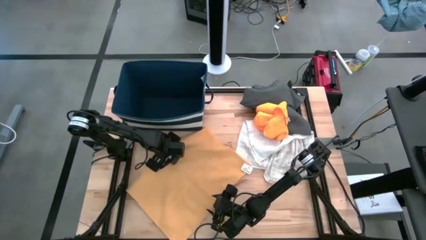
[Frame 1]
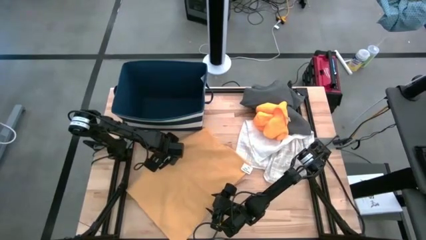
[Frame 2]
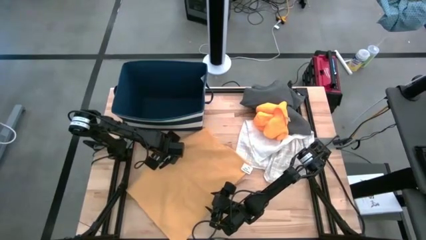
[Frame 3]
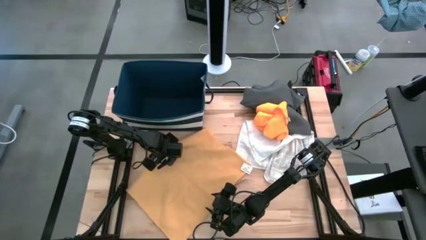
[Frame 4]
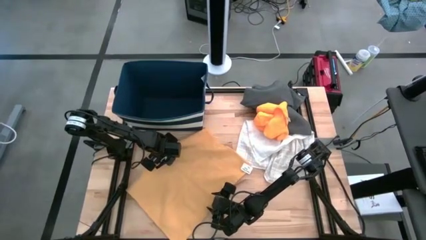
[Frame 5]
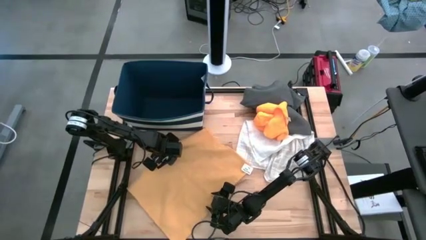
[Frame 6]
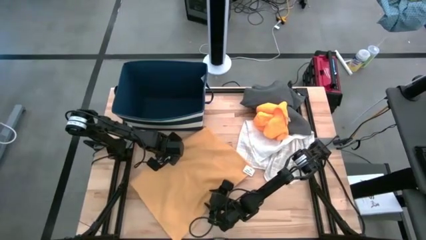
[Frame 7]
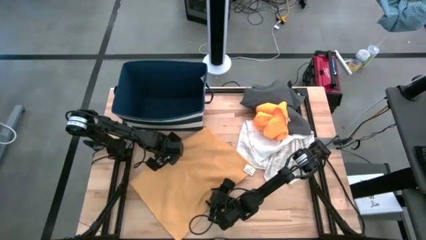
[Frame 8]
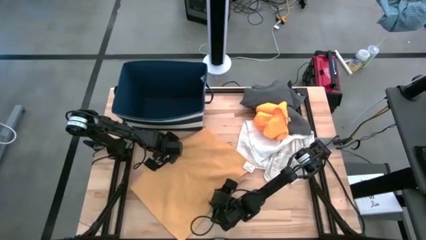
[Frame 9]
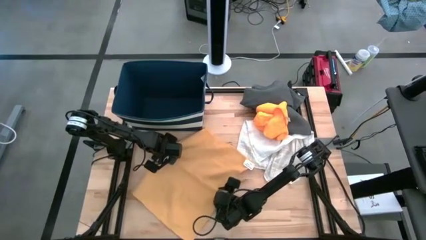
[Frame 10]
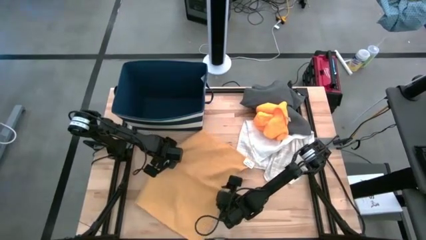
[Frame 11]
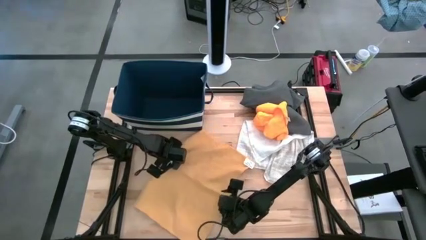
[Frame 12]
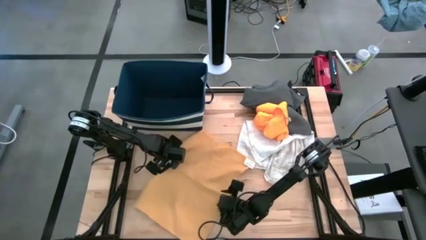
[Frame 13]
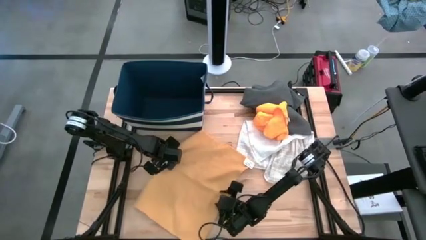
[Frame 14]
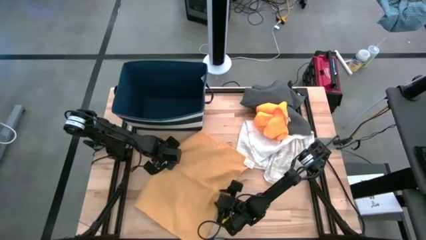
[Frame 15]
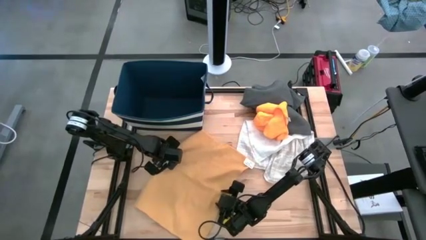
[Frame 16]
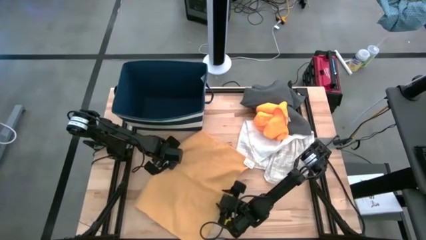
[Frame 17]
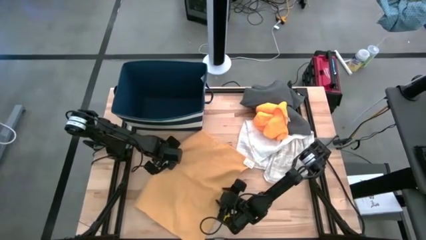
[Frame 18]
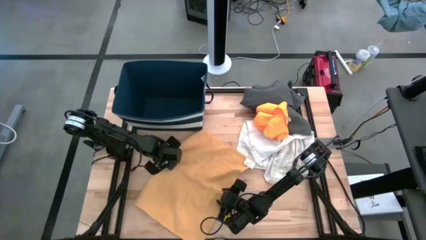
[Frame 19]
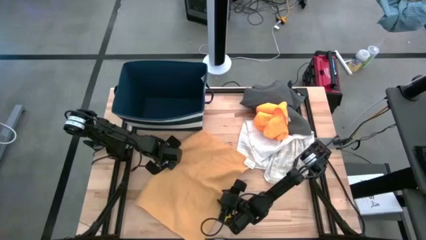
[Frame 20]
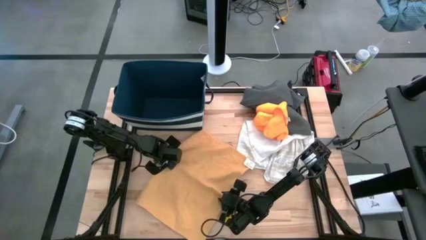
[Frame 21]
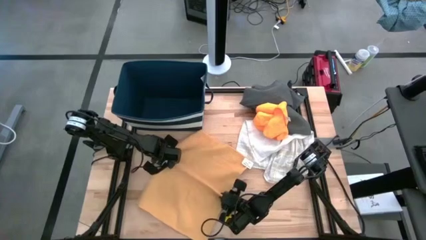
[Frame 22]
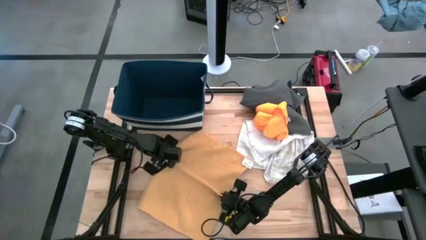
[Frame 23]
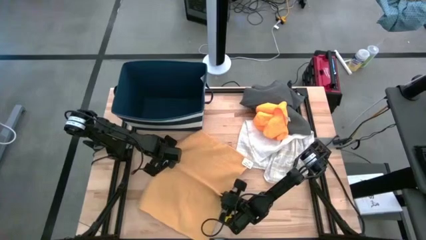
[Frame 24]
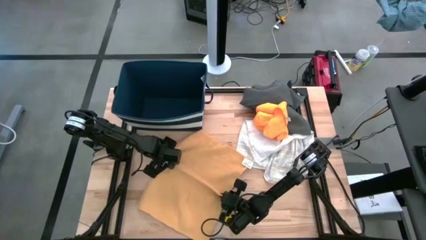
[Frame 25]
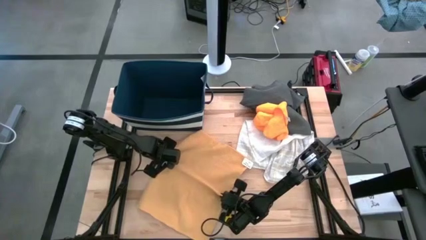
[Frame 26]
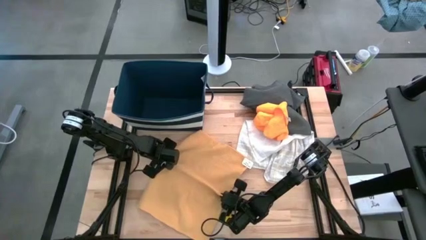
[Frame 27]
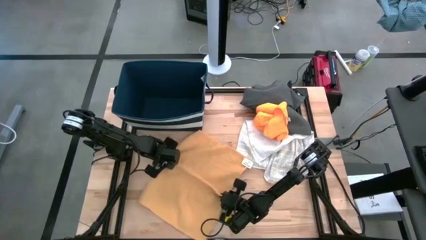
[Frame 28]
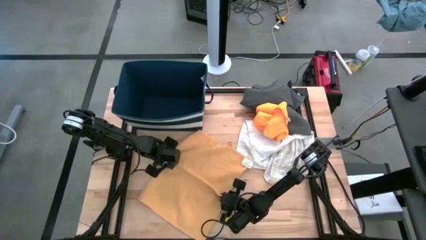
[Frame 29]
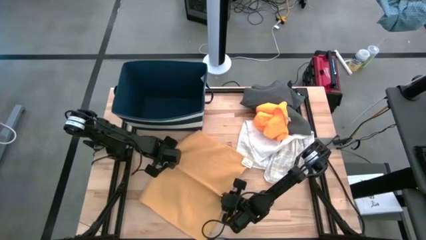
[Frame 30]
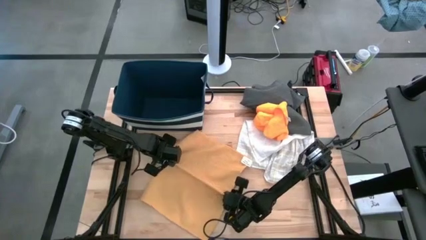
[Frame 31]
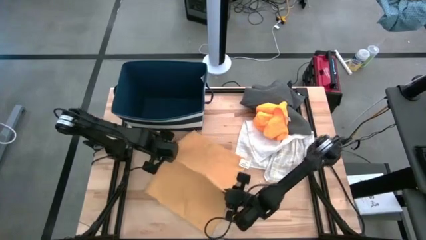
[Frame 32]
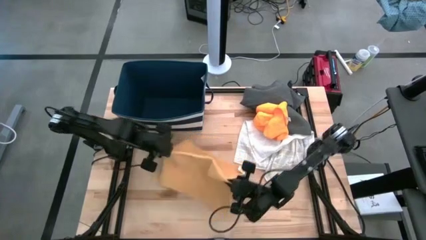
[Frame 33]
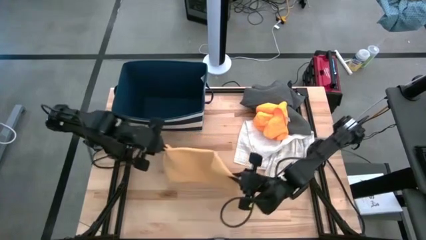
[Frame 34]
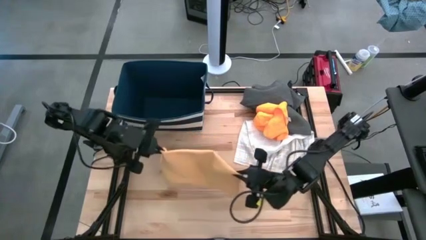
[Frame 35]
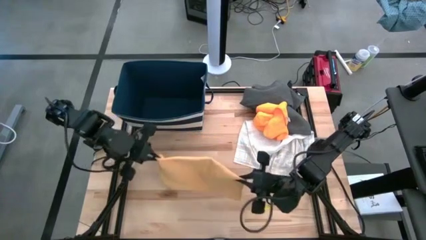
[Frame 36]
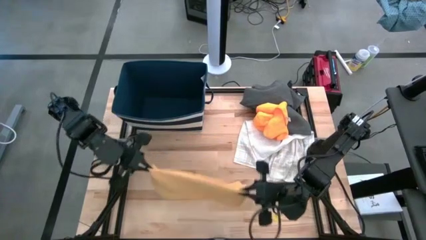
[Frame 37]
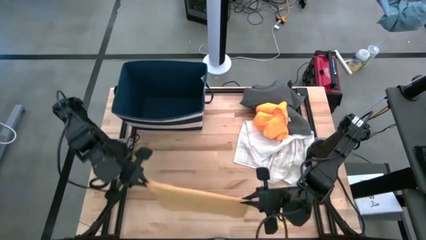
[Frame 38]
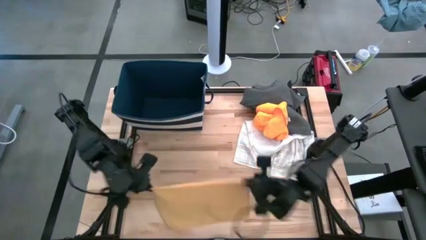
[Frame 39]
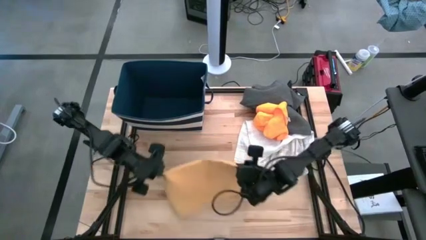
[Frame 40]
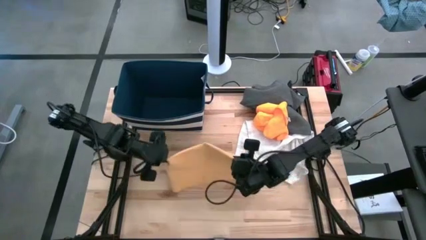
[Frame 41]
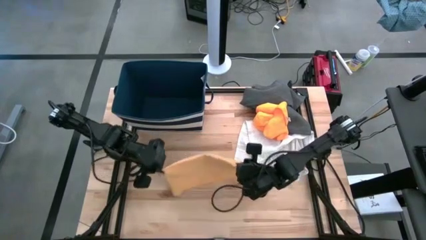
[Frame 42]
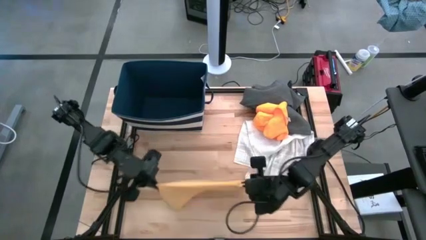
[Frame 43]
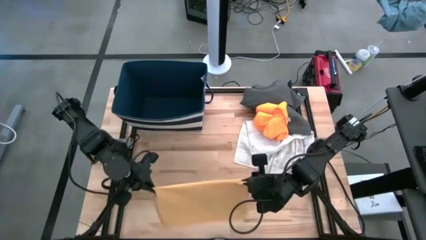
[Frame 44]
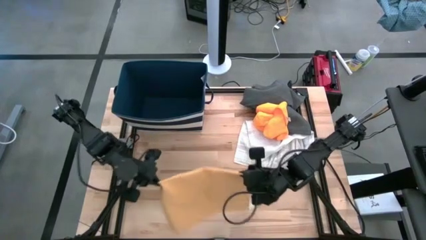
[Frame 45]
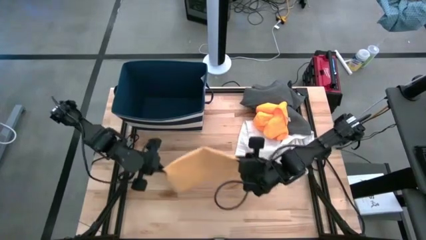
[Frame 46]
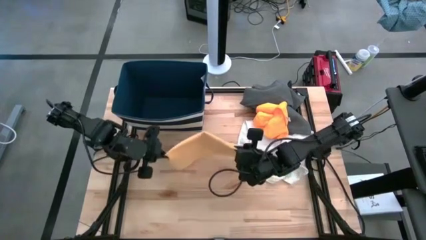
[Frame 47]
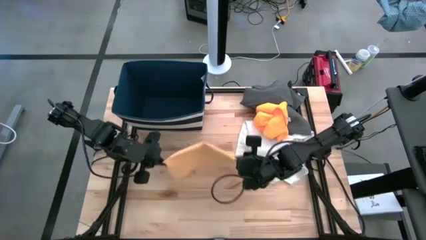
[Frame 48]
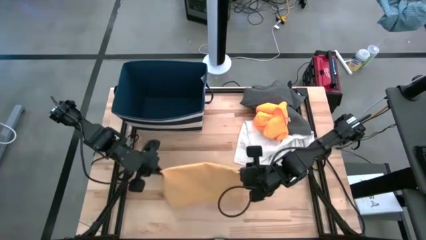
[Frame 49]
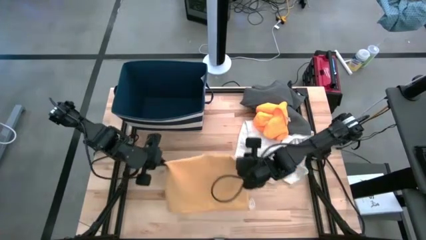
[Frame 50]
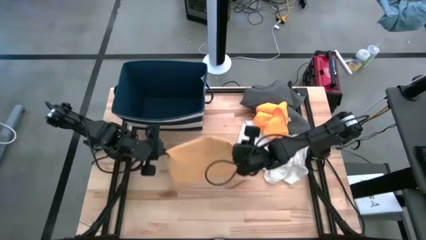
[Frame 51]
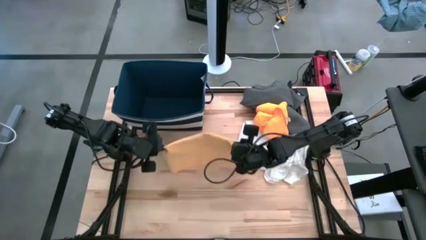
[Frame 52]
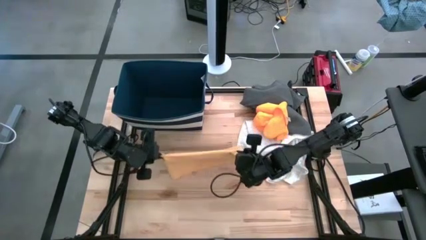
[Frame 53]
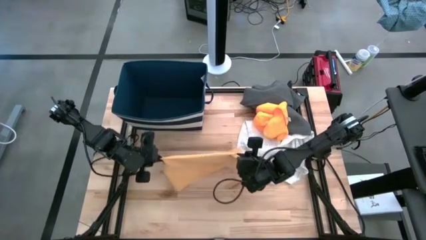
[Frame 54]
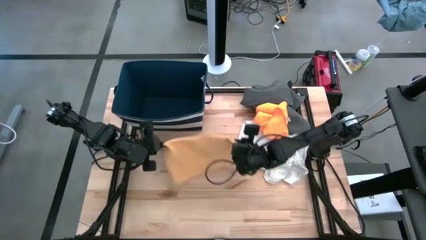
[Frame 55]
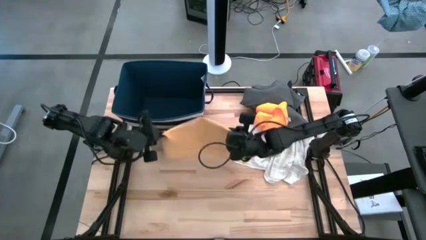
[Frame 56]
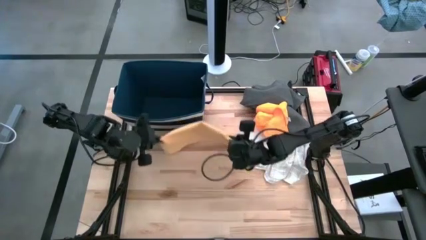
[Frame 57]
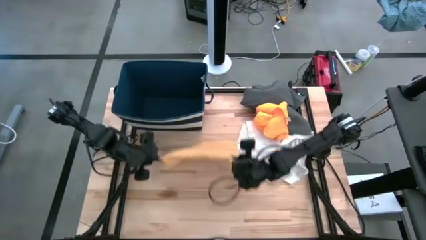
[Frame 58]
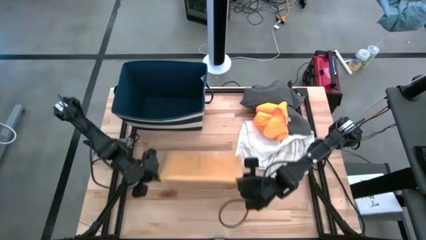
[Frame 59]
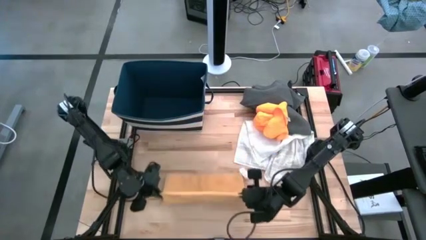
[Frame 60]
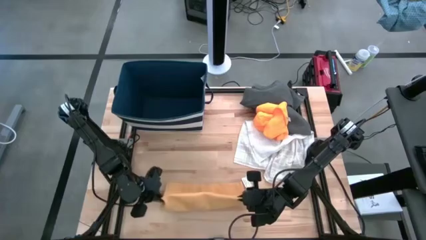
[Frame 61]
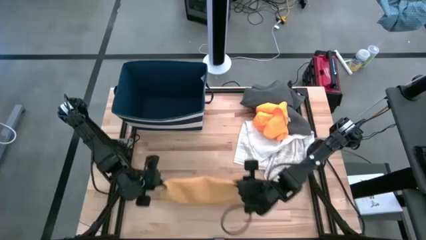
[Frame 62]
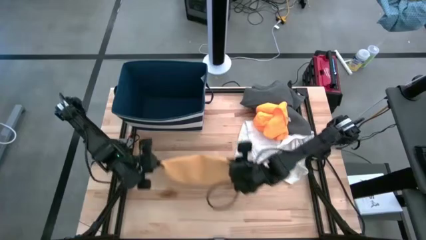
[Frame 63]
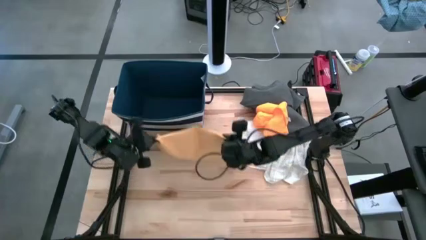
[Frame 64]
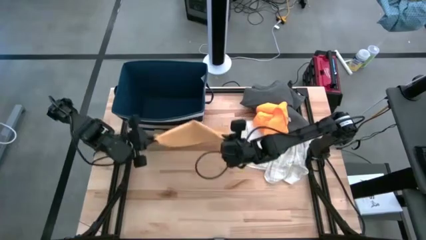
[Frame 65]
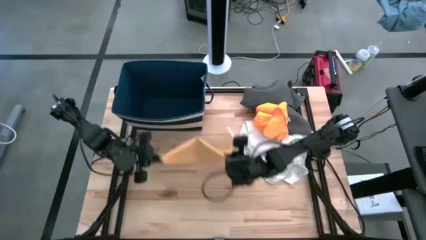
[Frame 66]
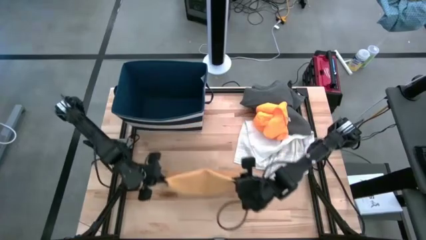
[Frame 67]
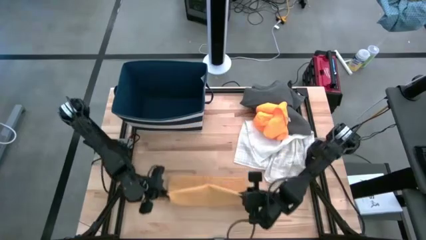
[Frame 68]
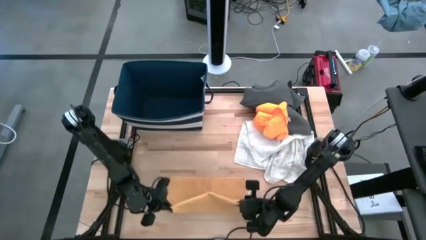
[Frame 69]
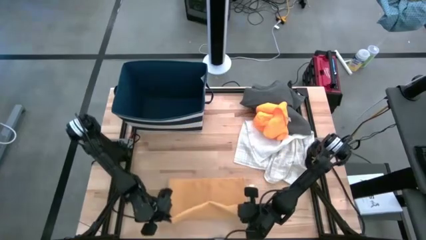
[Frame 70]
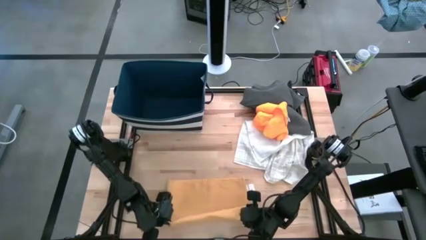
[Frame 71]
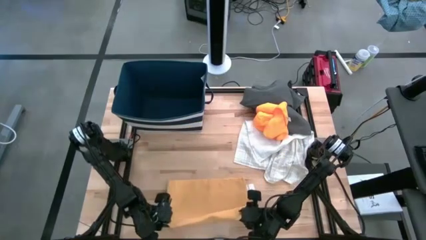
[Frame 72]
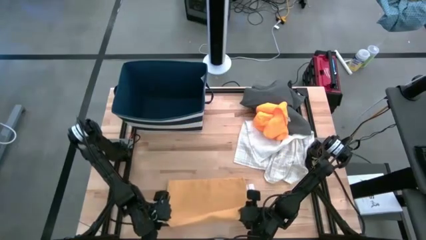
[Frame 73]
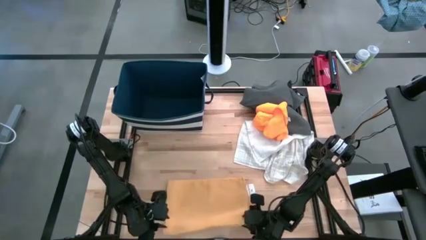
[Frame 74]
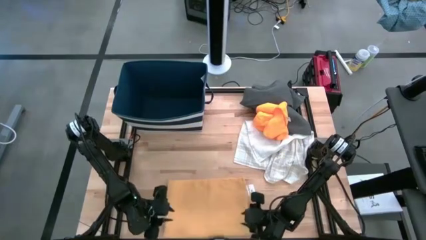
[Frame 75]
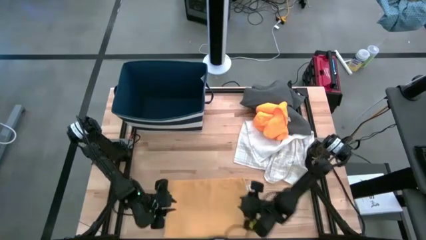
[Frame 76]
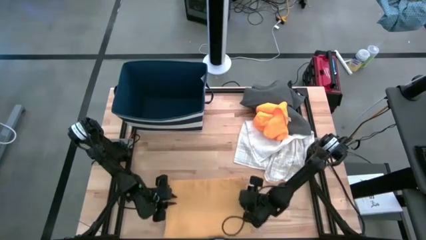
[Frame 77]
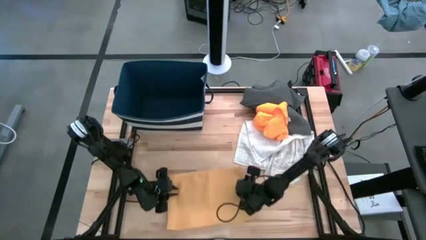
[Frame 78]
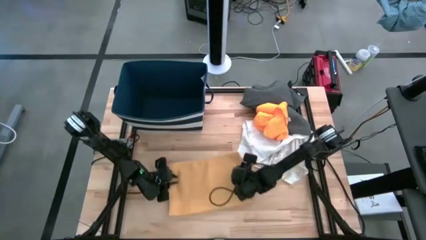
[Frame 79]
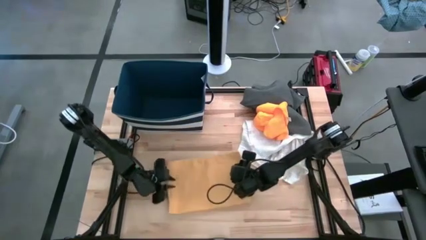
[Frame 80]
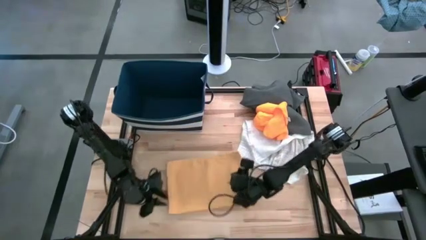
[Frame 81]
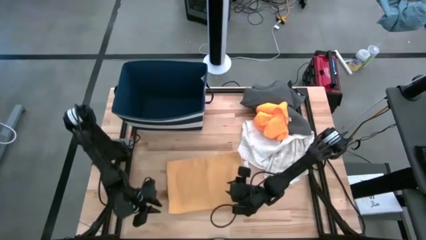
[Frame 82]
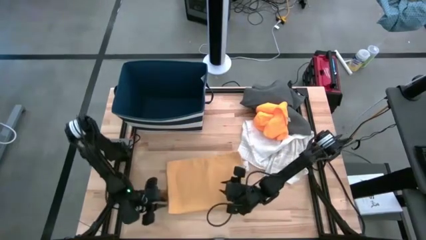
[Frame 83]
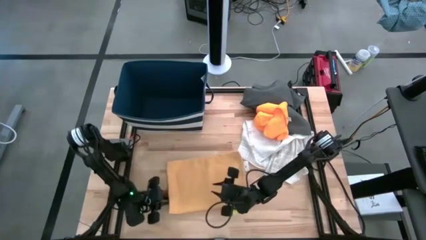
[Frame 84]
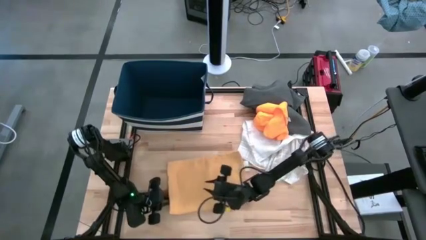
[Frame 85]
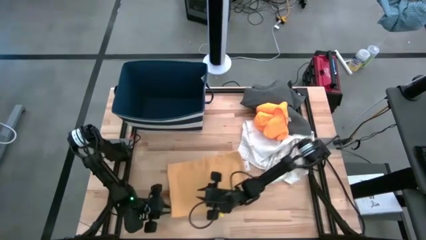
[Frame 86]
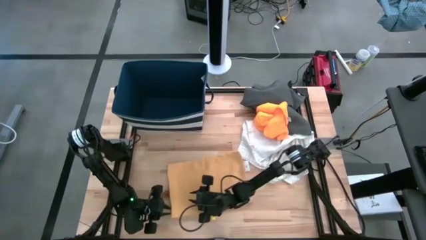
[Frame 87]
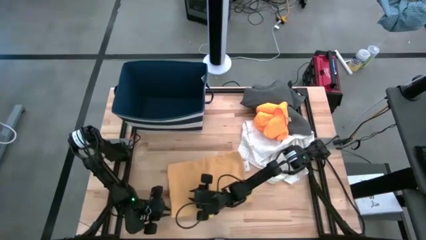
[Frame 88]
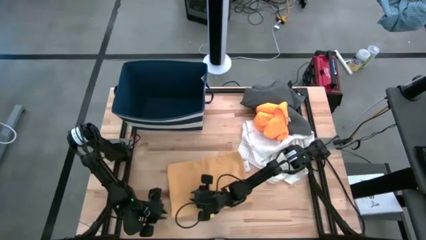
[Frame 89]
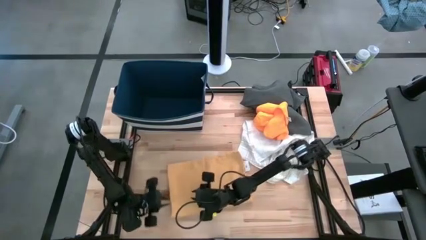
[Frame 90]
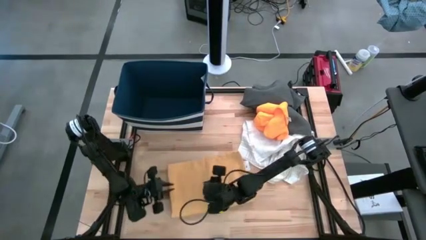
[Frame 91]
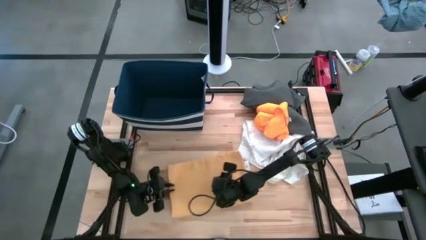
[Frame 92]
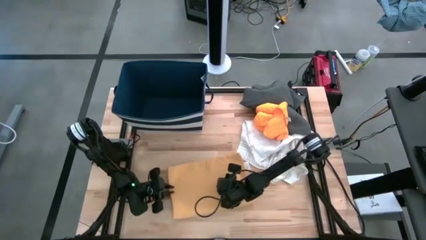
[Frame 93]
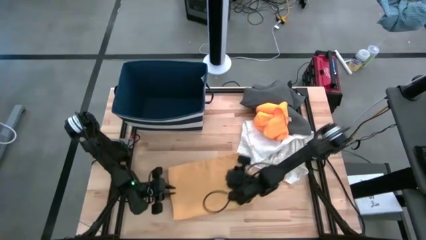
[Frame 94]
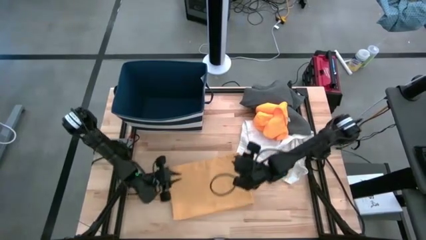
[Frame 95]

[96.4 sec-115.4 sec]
Task: Fold towel
Fold the yellow kitchen towel
